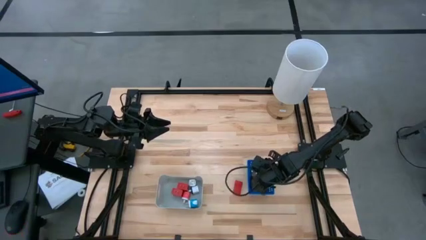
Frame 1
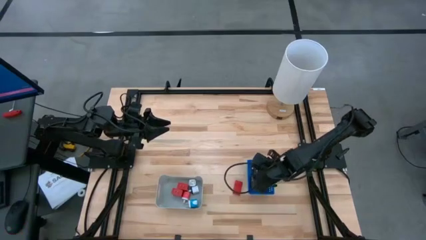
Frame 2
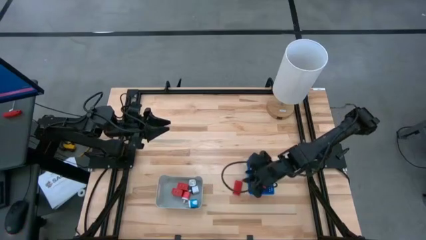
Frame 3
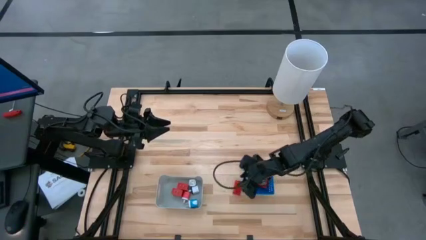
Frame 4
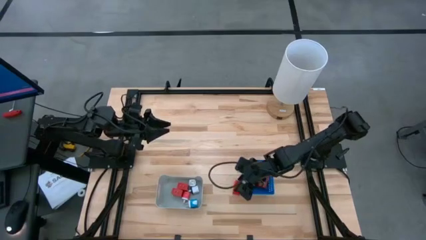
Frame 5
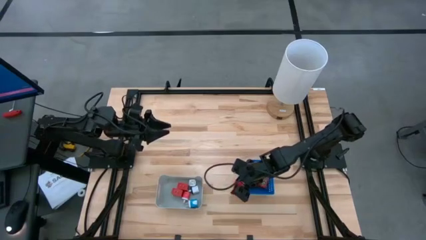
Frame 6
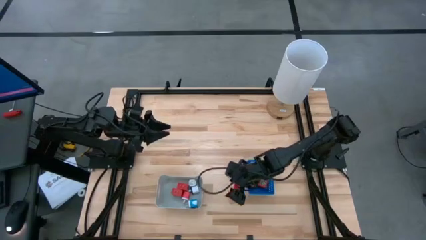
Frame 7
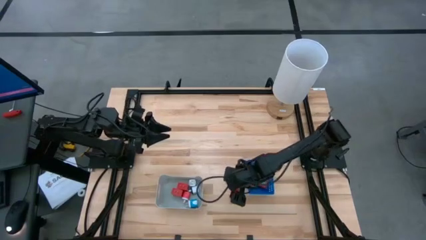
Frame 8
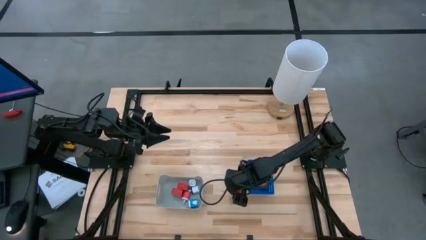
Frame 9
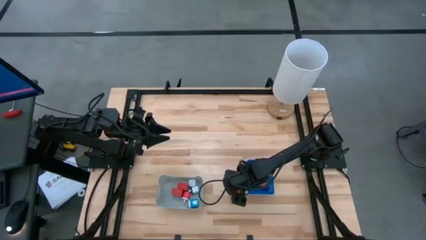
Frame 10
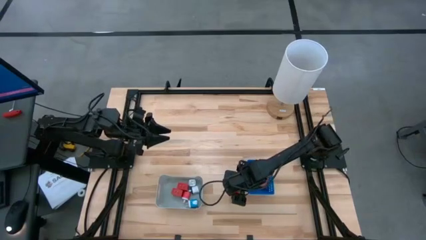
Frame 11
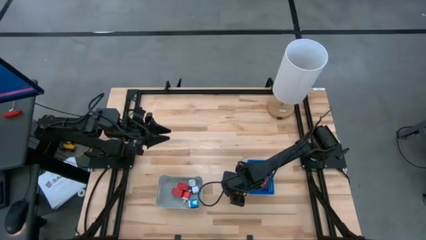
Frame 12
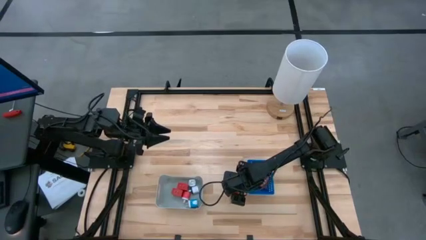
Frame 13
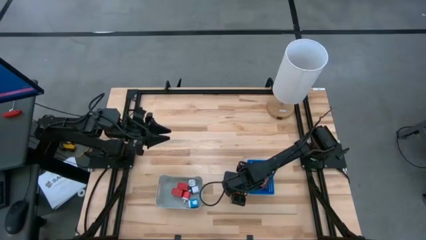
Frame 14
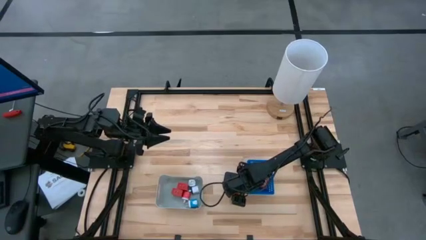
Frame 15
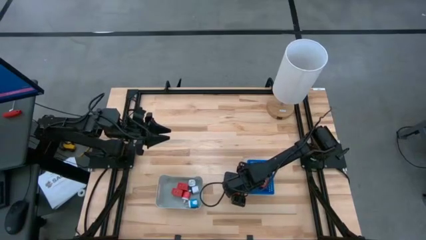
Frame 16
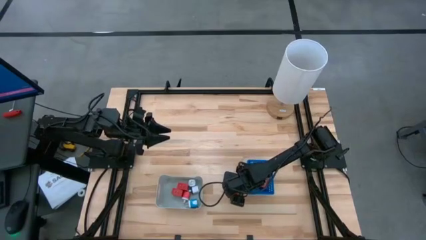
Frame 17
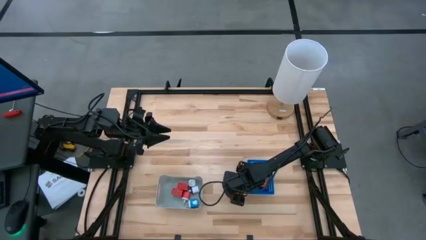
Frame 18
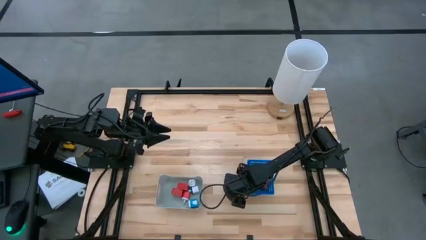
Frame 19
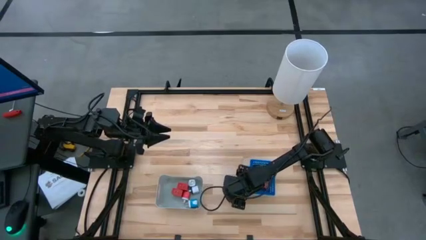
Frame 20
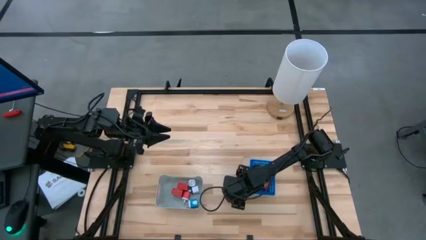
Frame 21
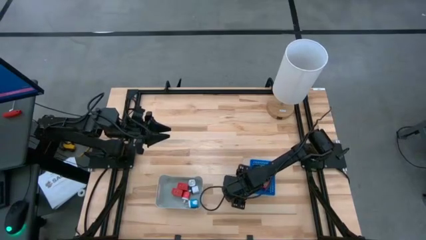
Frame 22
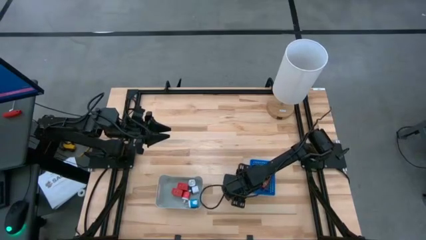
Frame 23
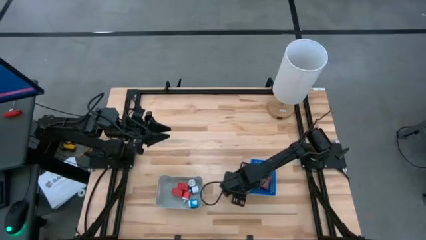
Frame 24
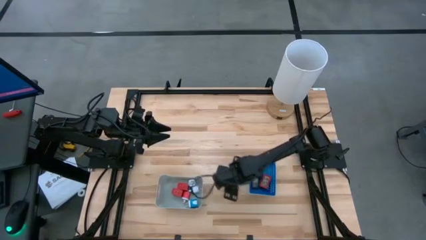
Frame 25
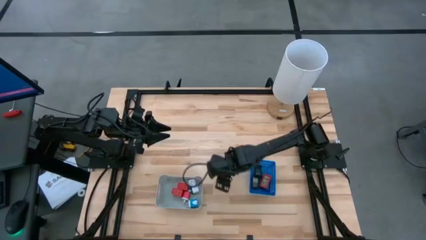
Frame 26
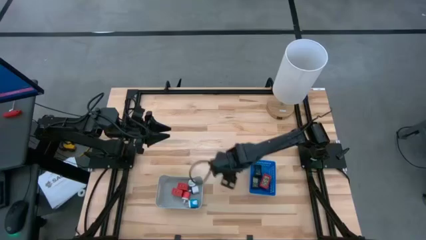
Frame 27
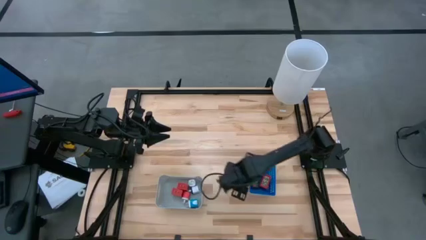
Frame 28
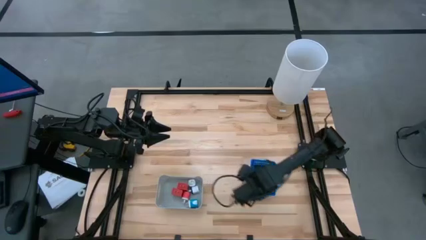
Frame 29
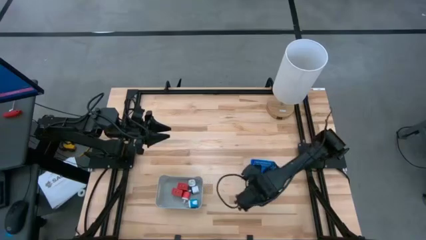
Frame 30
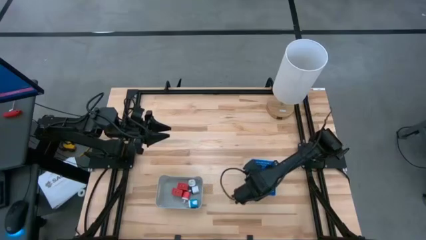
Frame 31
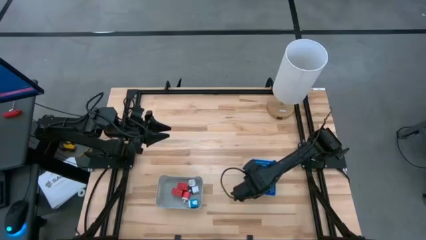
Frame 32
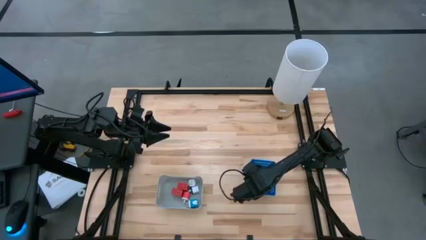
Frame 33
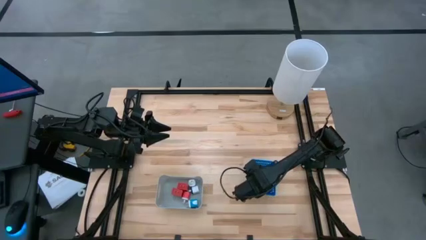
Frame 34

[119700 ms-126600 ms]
Task: Pick & Place Office items
Put the red digital timer into the blue bin

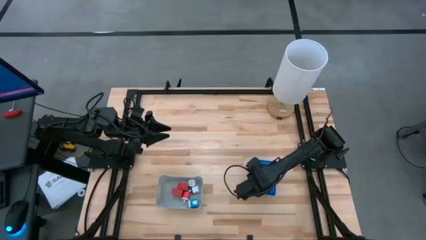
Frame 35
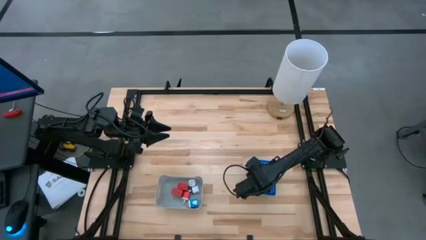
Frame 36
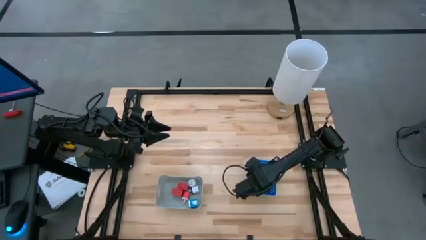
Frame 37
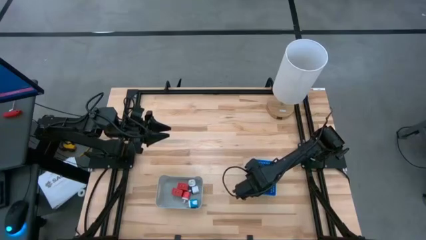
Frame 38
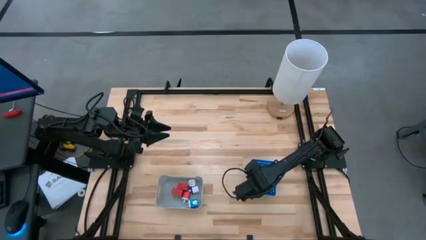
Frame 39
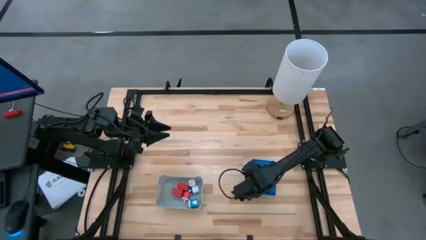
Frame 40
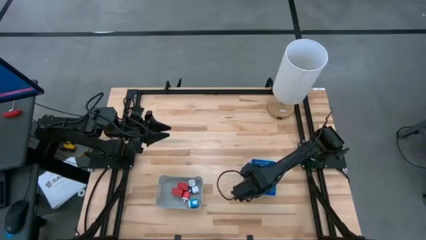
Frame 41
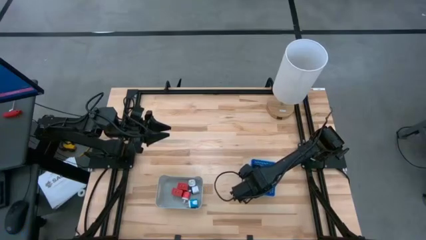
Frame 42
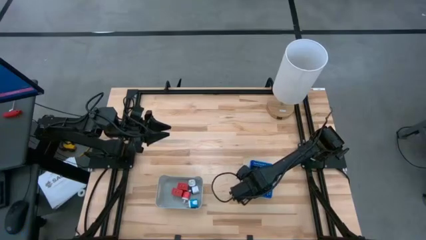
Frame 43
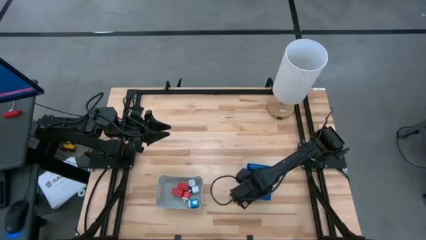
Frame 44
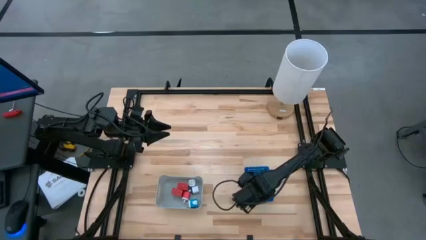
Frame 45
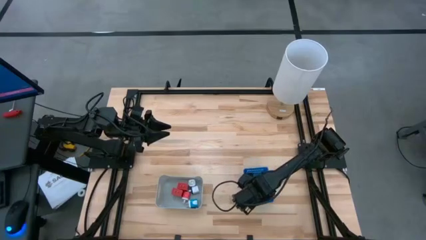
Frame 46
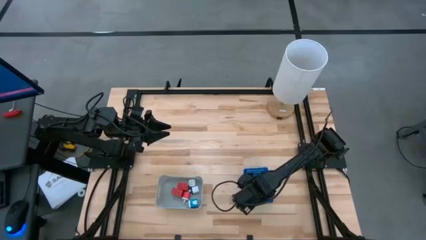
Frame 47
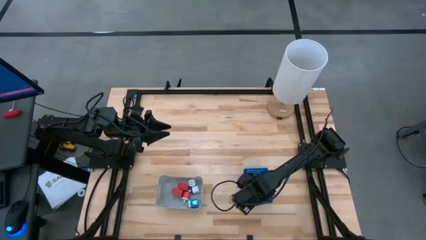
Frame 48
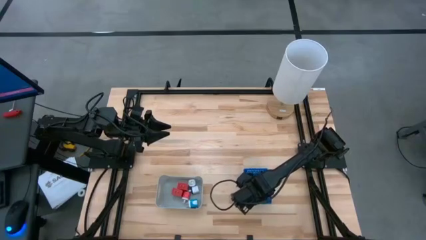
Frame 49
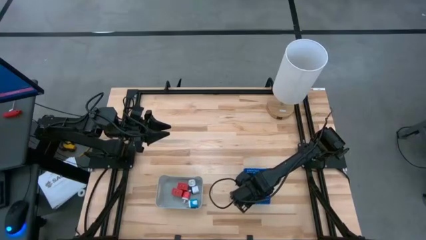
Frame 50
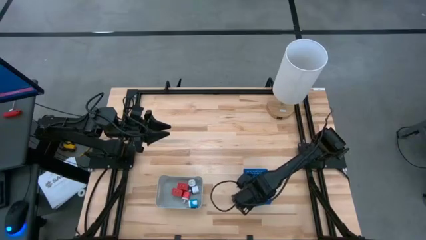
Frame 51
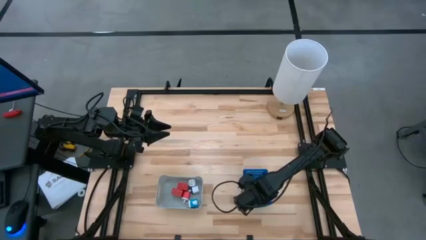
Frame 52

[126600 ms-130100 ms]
Adjust the blue bin

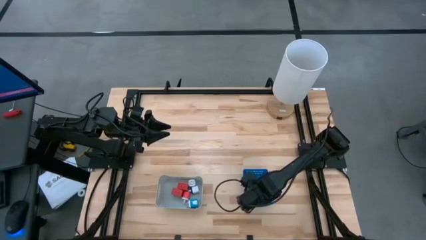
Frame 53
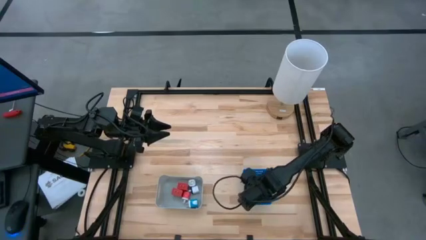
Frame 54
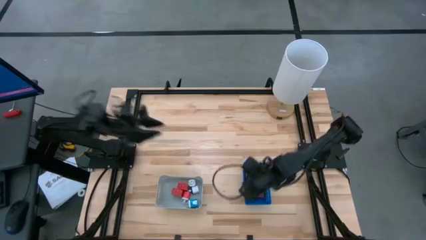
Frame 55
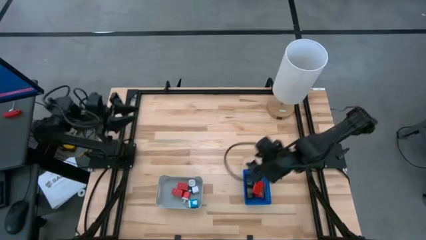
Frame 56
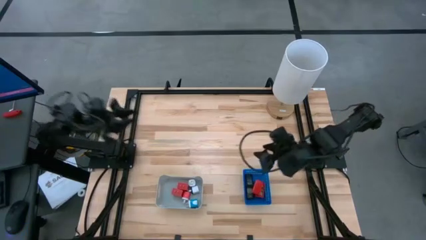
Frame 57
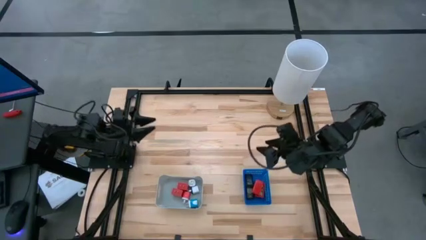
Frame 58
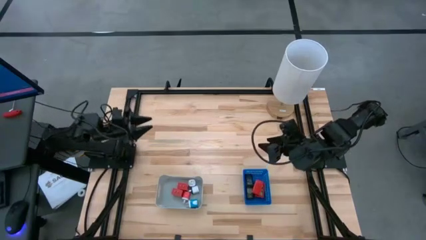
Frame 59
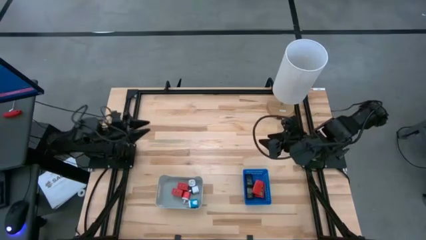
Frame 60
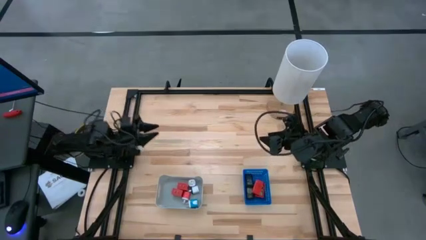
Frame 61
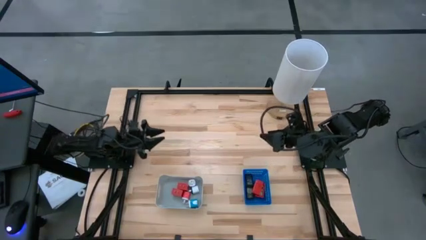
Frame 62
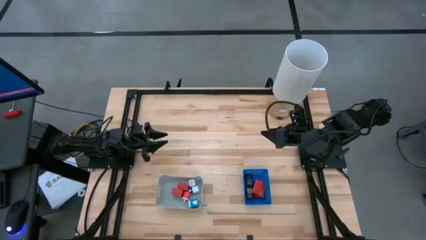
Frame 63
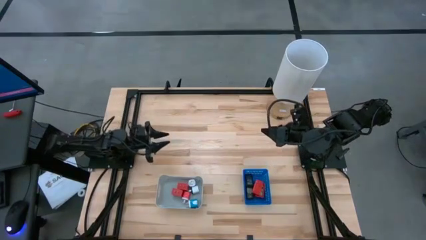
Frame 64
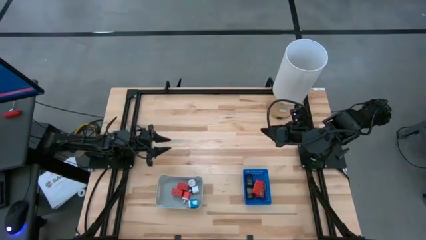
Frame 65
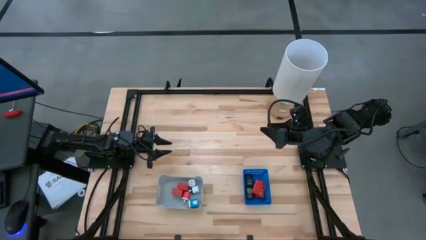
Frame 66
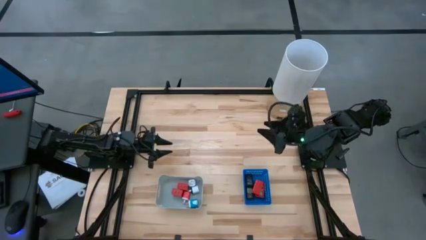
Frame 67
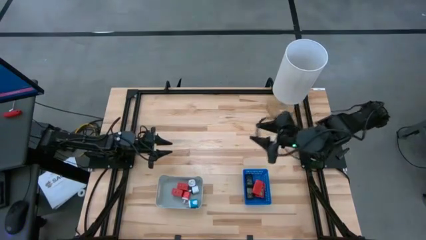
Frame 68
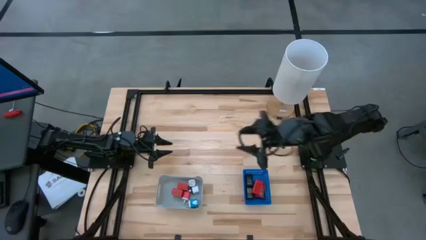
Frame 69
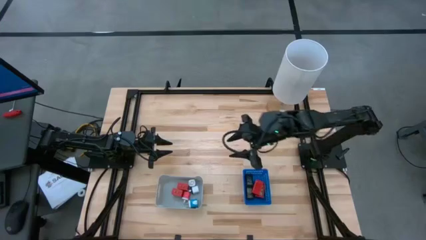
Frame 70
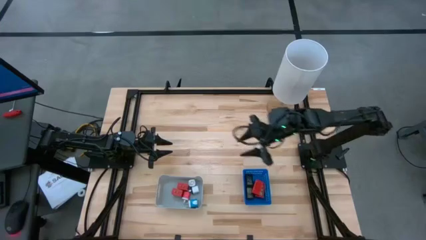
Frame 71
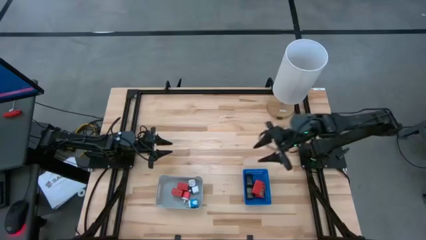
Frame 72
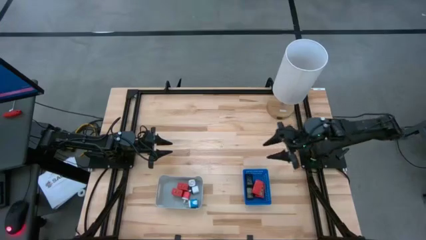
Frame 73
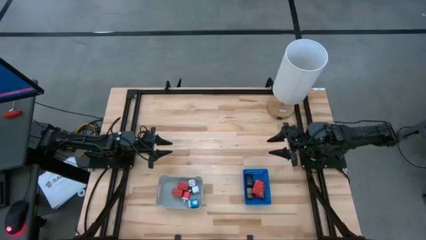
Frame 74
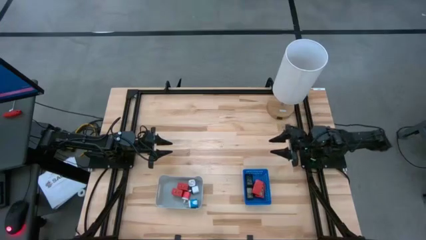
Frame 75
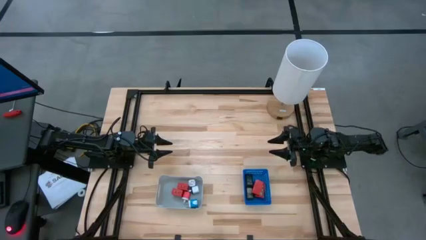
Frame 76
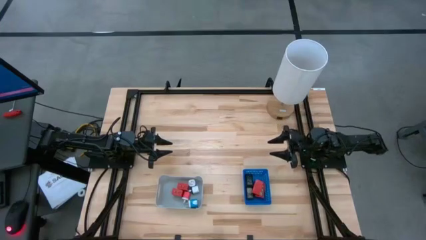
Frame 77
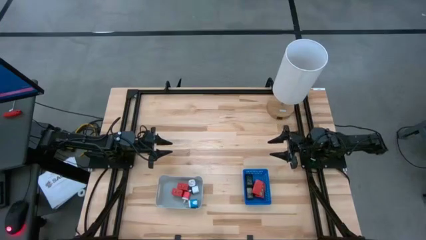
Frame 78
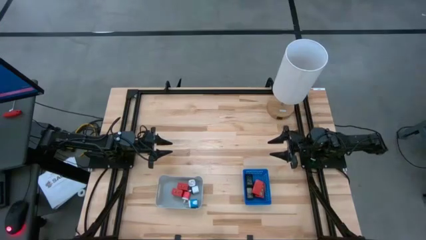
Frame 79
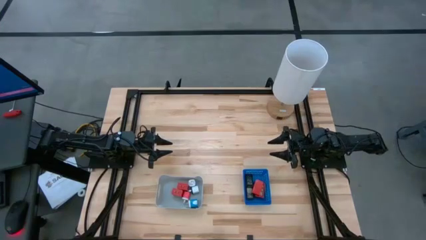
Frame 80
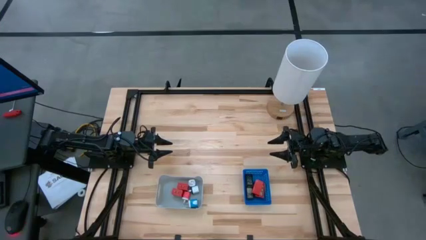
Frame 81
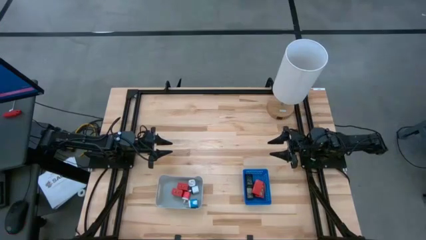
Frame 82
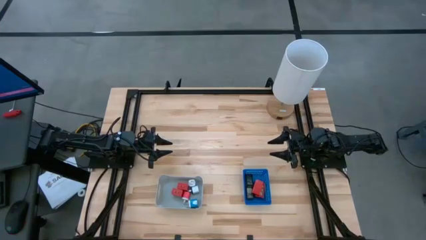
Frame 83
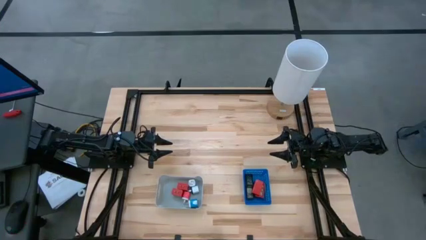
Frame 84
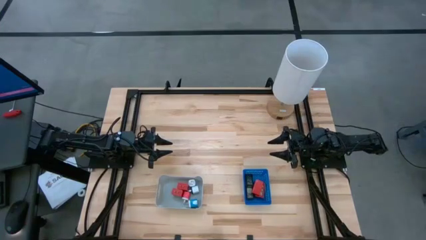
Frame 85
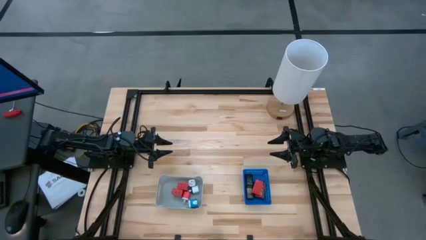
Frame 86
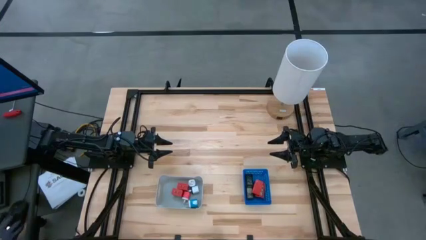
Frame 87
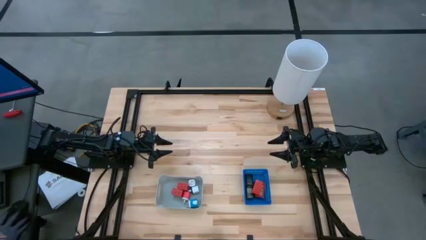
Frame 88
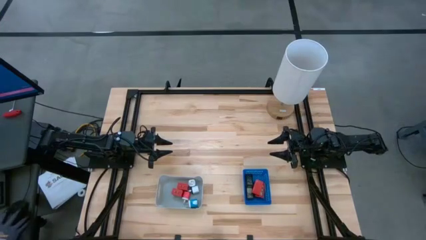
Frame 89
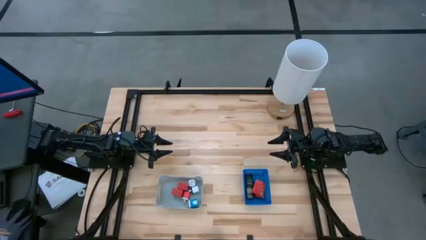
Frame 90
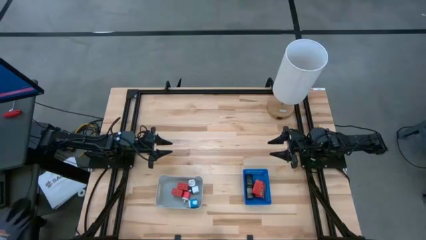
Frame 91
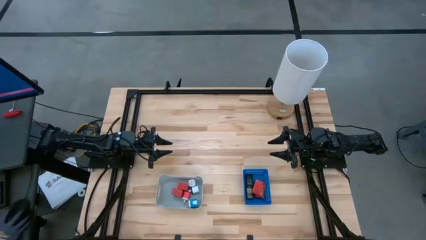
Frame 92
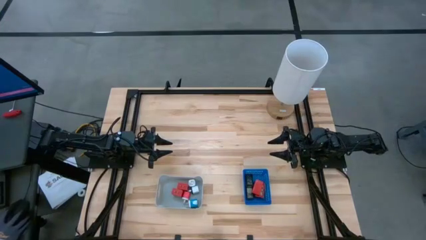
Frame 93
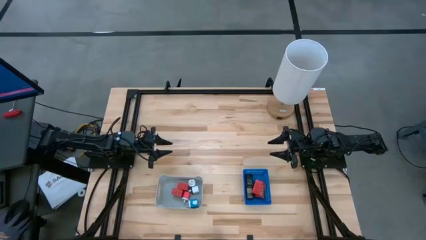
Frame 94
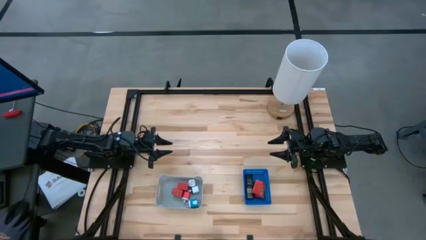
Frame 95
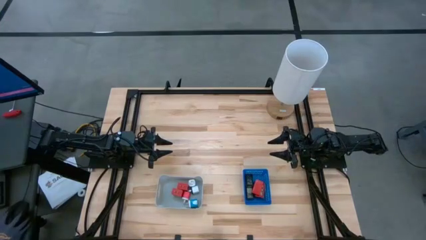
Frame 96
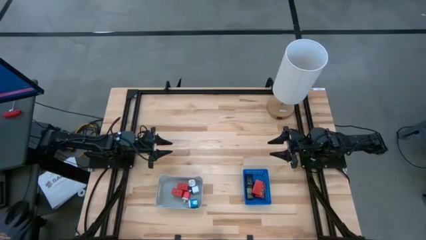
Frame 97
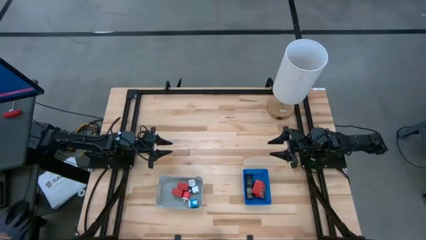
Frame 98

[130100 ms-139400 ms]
Return to Home Position
